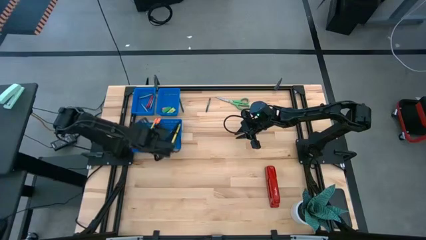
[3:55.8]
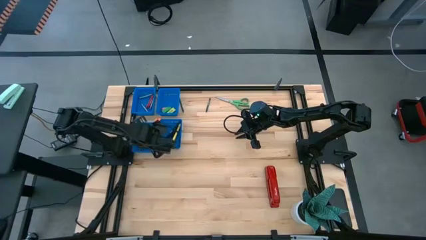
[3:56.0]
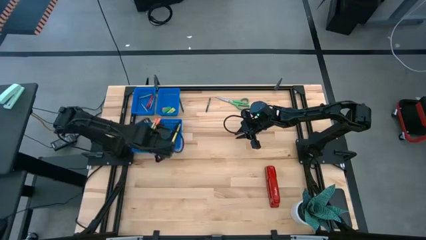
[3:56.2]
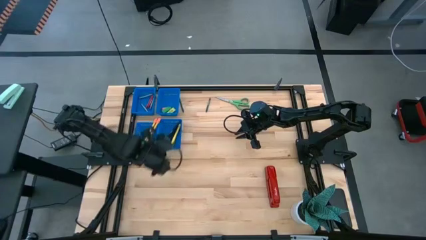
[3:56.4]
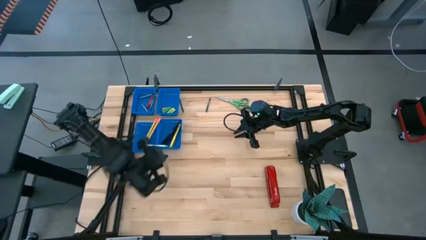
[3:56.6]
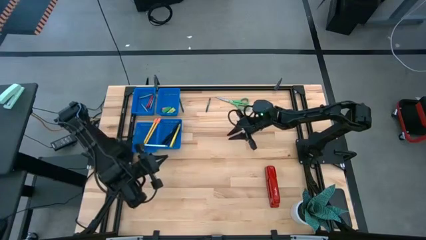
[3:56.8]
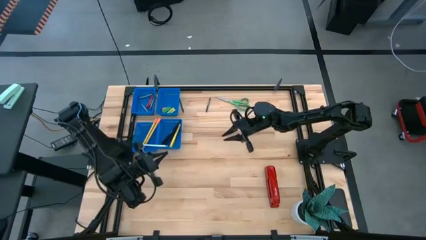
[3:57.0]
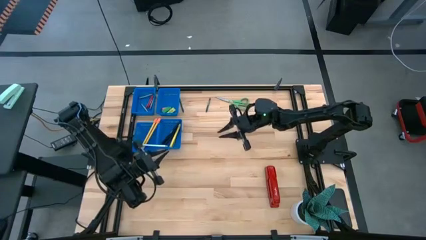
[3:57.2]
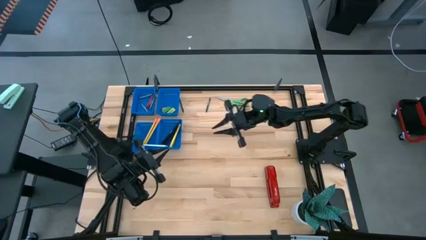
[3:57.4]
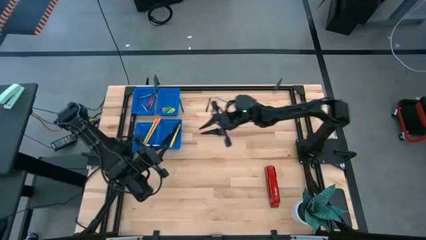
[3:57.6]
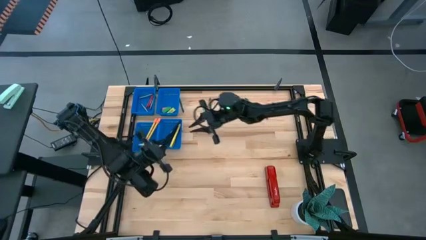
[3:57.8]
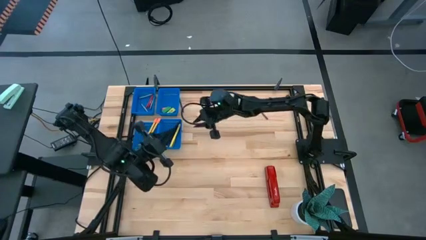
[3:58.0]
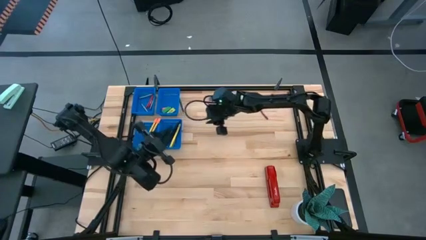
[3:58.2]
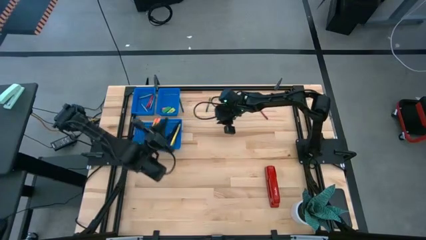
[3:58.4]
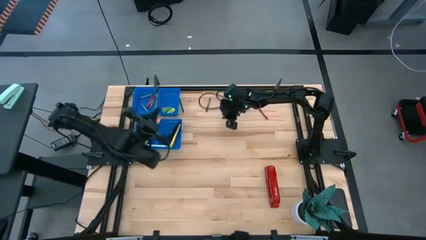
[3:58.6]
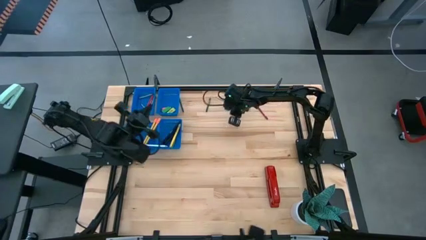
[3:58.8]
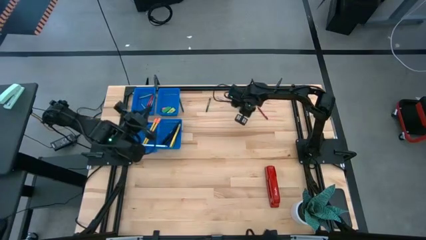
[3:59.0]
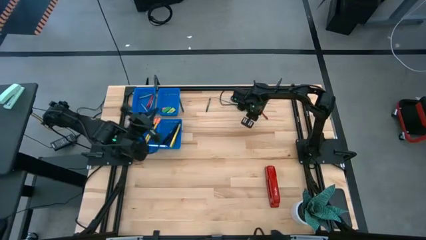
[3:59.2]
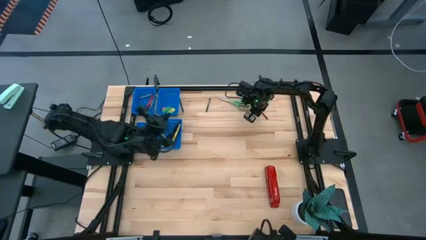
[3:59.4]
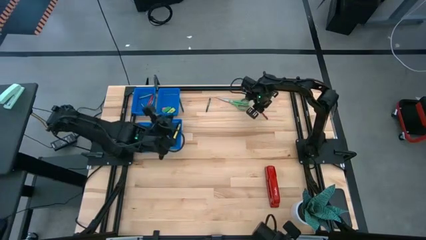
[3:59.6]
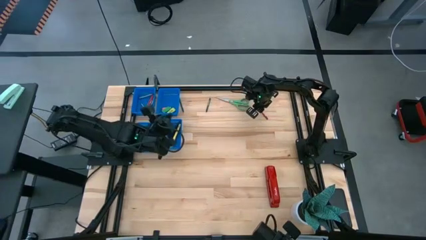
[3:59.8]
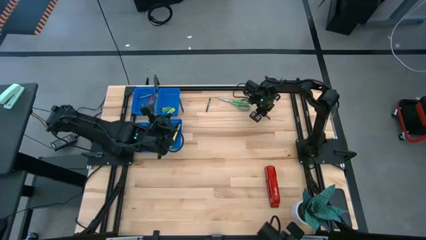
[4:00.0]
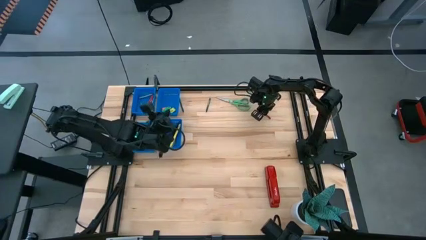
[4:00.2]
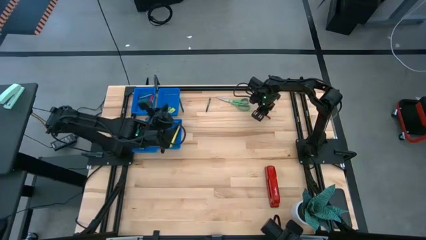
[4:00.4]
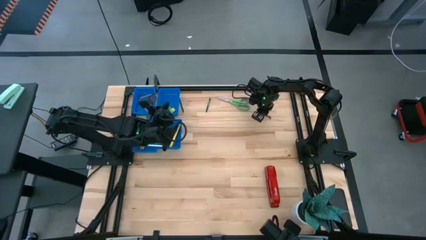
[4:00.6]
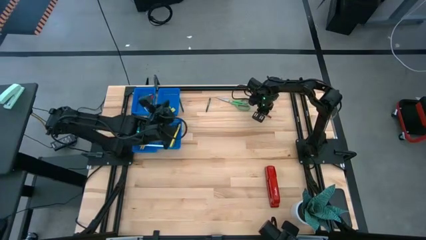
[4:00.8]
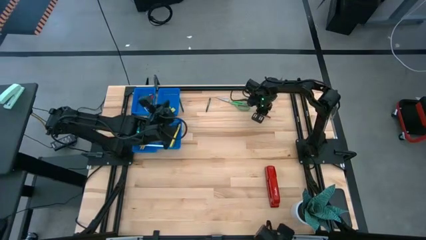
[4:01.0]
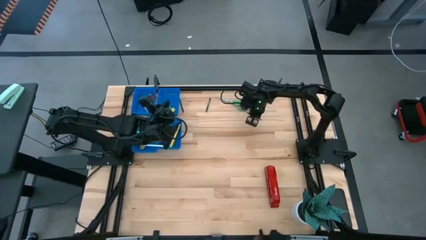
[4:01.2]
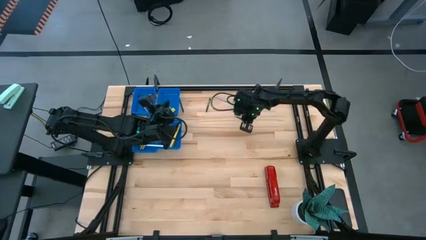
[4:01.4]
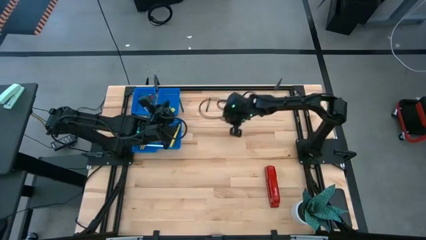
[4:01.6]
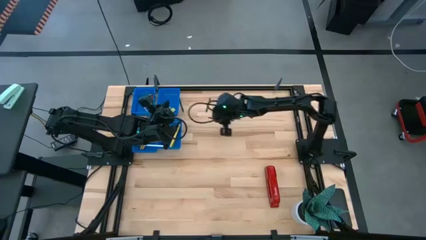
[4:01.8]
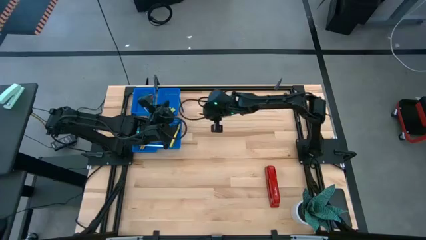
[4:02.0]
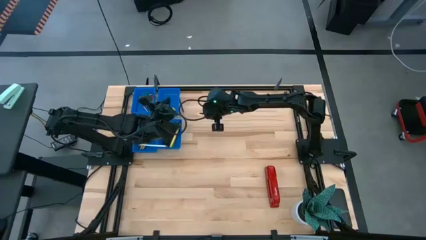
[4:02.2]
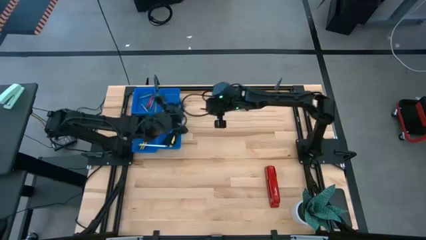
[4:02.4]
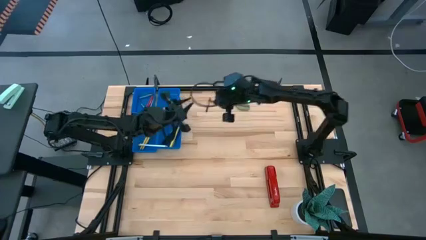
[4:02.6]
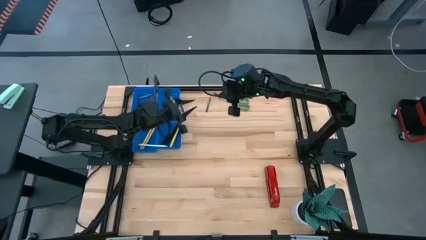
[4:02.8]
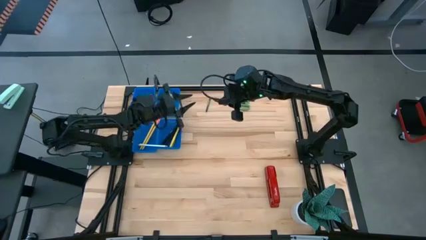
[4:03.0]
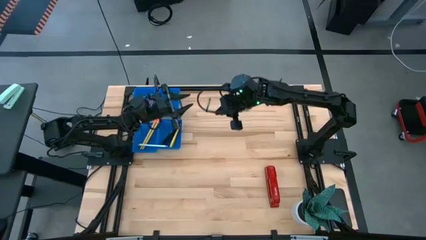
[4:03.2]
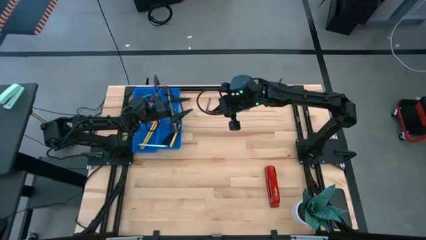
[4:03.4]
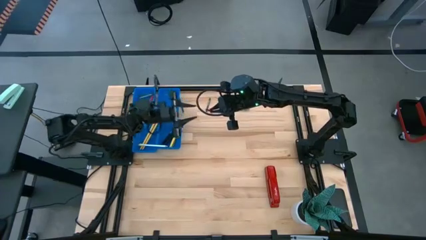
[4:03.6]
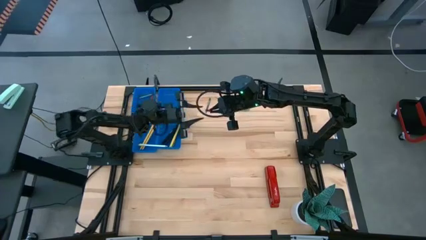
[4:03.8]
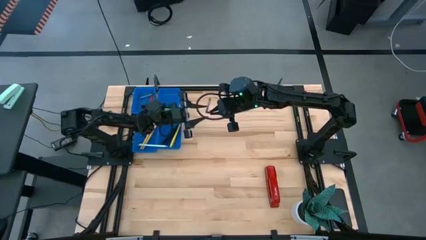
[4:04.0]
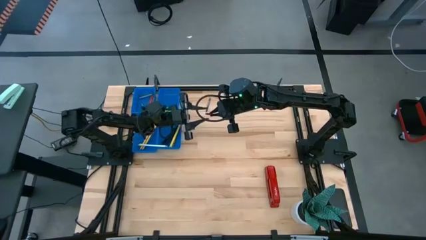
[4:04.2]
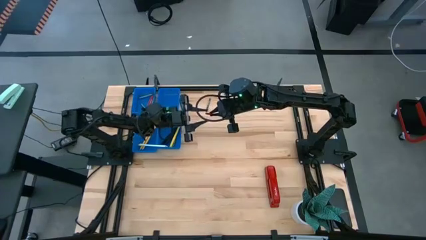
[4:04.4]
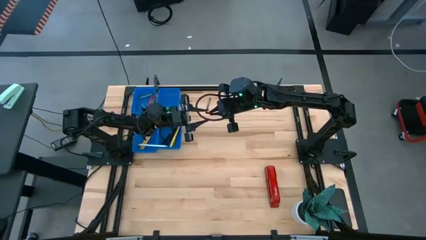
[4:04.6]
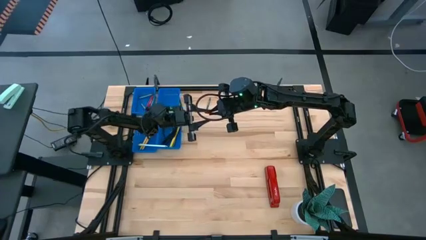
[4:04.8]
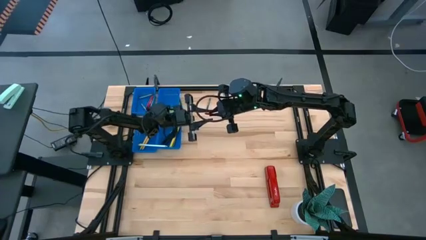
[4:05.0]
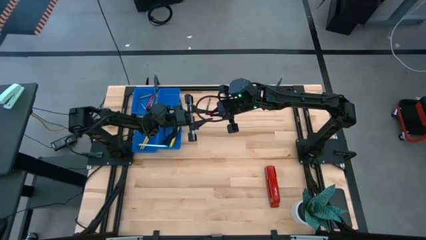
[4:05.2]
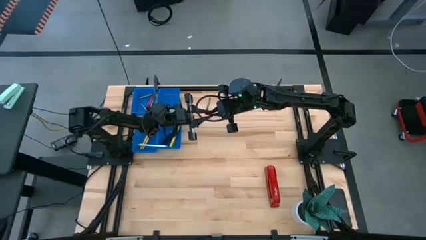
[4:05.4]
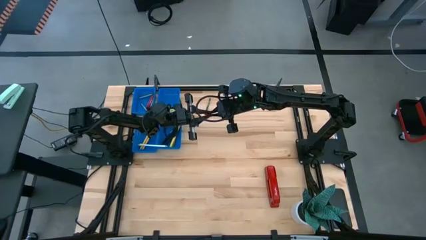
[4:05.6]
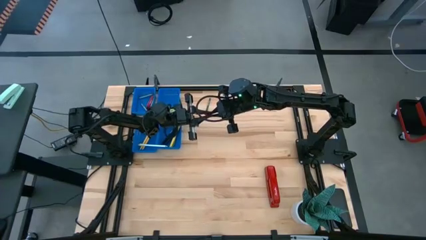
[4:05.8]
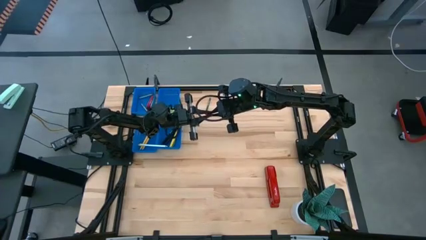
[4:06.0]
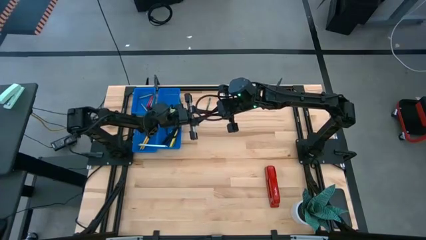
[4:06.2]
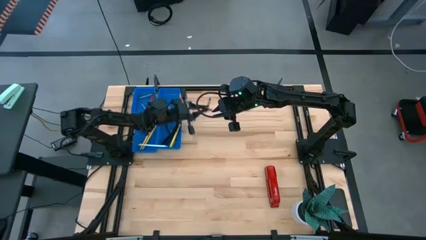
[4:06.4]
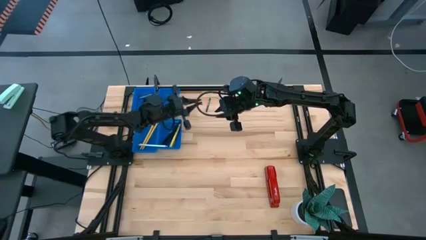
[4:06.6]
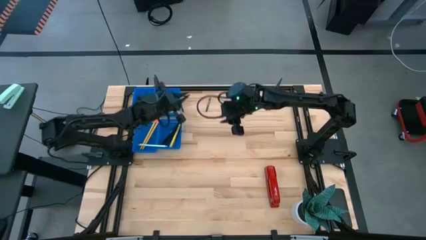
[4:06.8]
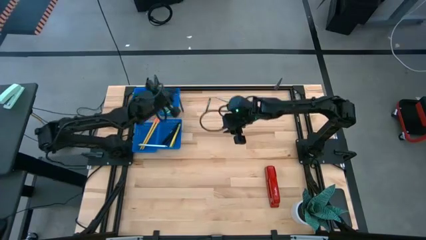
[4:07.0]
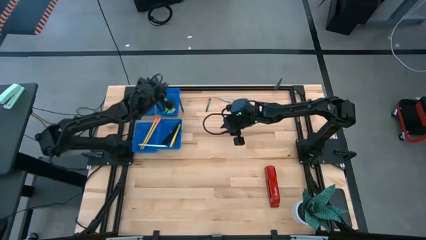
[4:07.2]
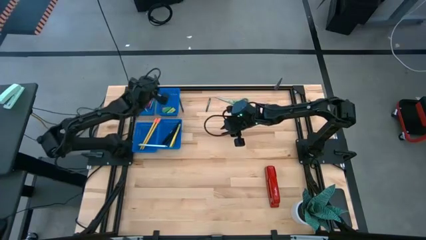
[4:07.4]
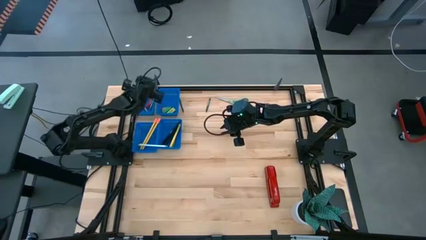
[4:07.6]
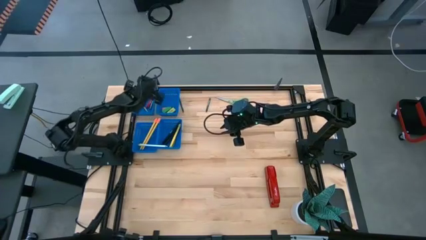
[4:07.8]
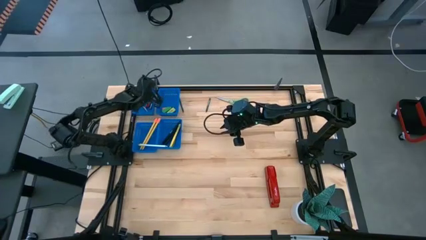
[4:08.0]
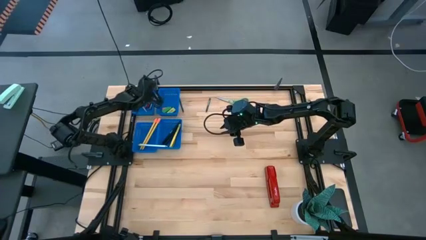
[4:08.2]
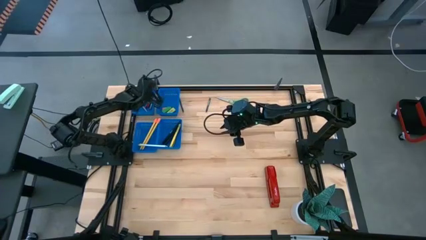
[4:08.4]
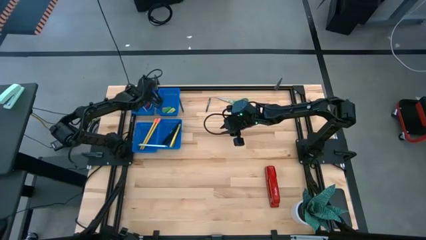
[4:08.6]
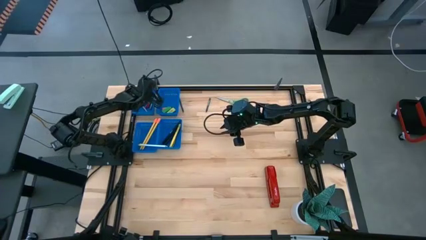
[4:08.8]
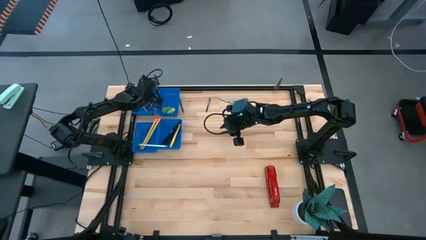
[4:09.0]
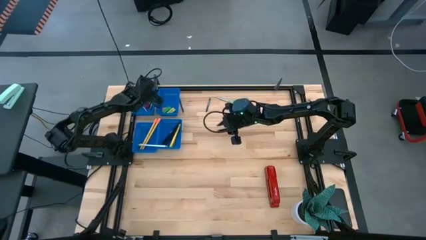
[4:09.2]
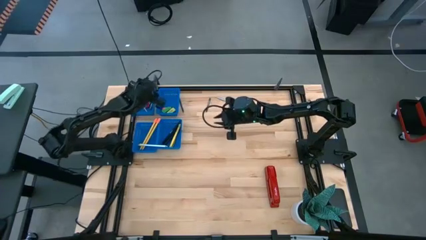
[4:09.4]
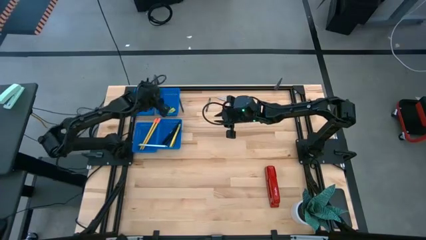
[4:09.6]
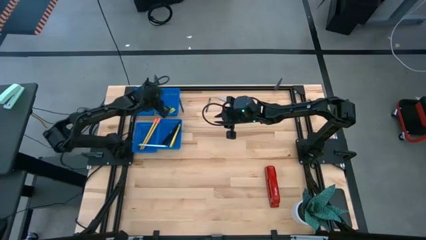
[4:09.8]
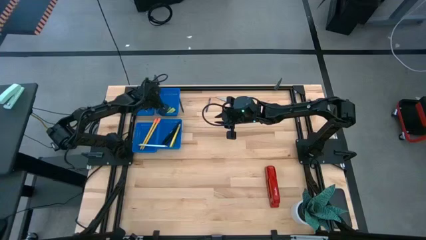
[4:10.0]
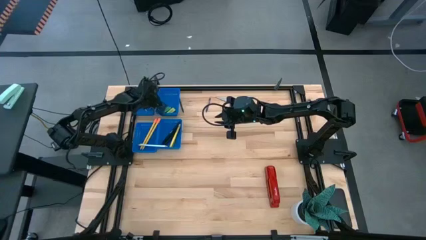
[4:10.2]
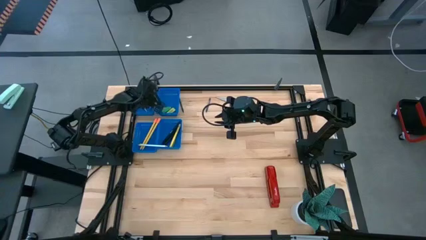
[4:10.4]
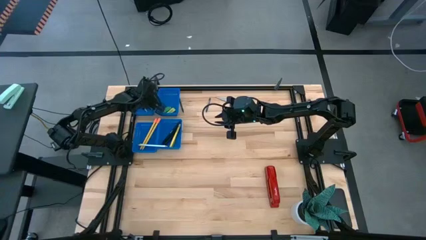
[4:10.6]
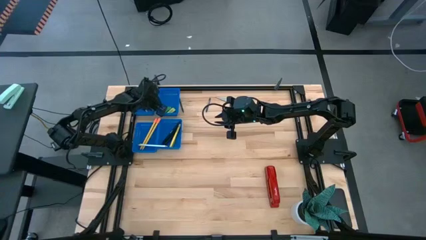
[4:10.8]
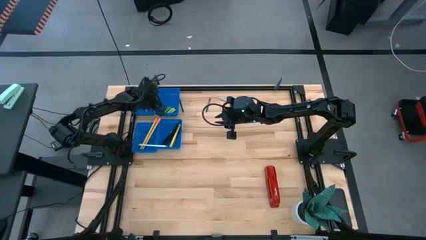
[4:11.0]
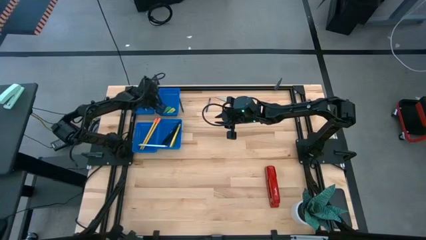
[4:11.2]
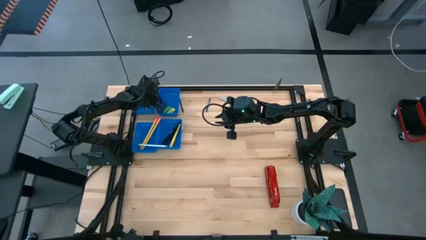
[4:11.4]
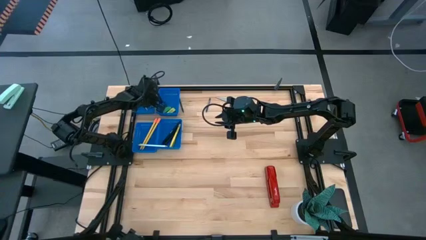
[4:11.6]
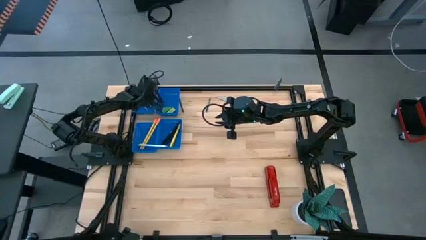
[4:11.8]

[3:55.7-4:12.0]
Task: Sort crayons/erasers/pens/pencils in bins
Put the red crayon into the top left blue bin
